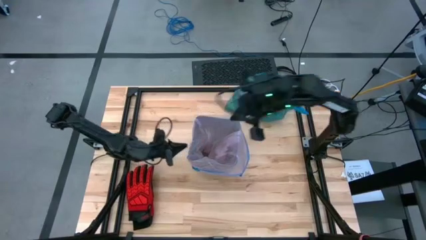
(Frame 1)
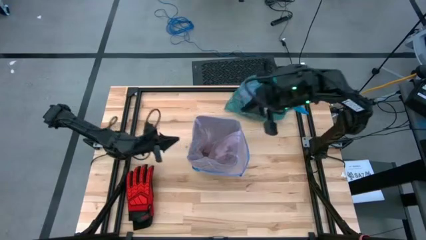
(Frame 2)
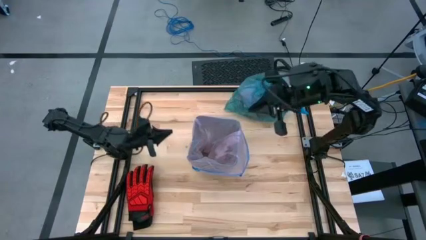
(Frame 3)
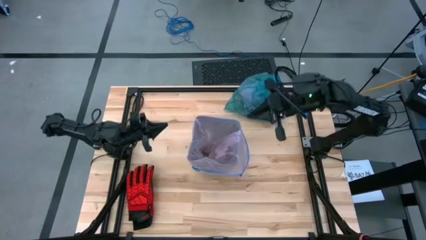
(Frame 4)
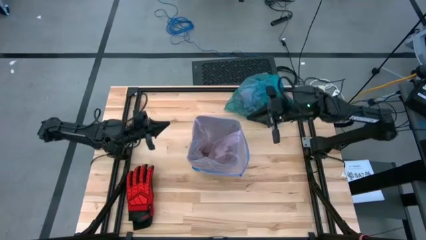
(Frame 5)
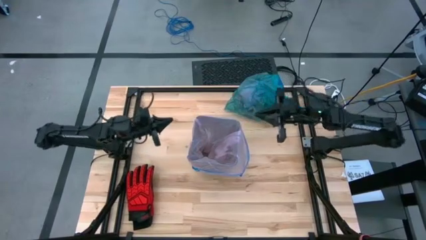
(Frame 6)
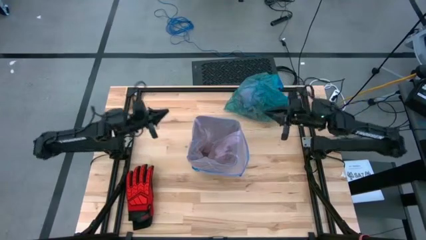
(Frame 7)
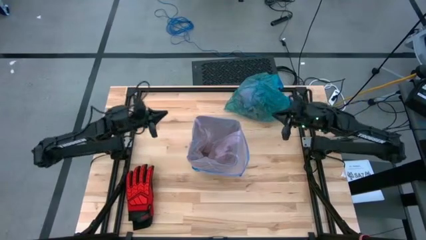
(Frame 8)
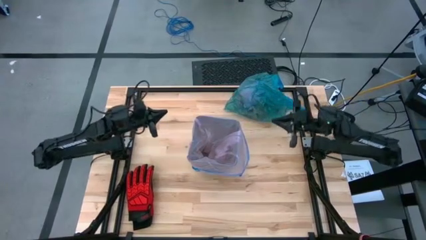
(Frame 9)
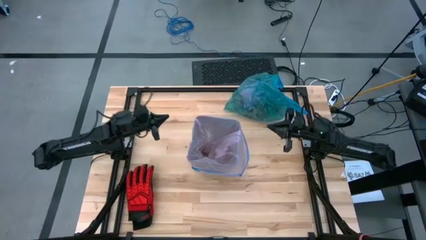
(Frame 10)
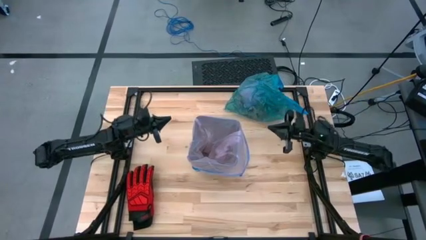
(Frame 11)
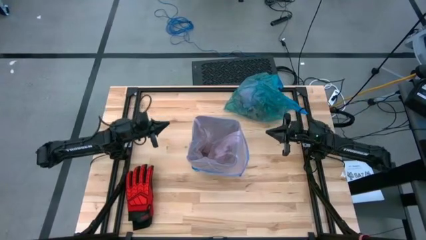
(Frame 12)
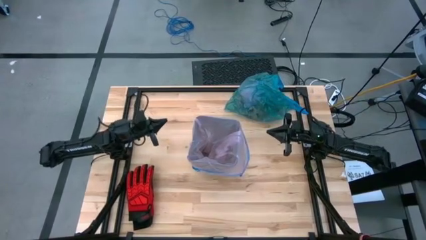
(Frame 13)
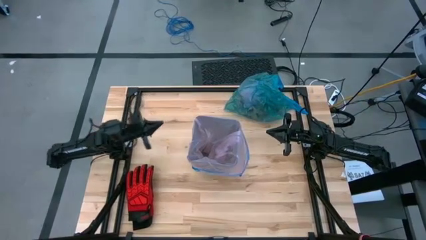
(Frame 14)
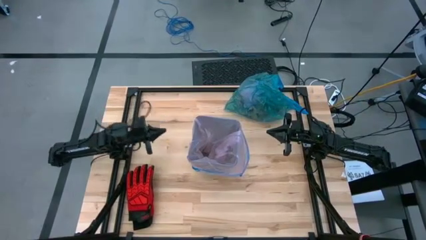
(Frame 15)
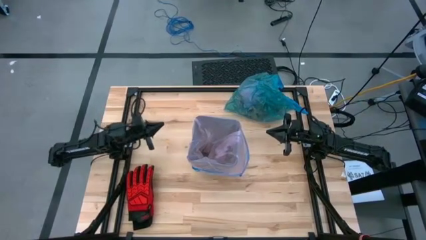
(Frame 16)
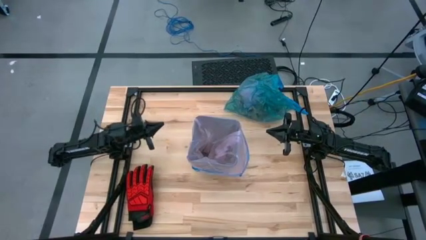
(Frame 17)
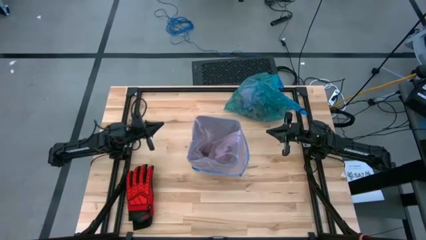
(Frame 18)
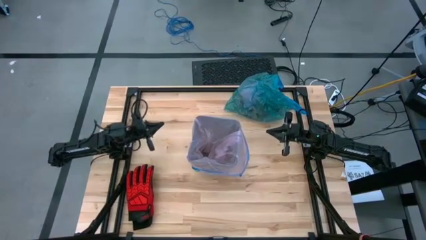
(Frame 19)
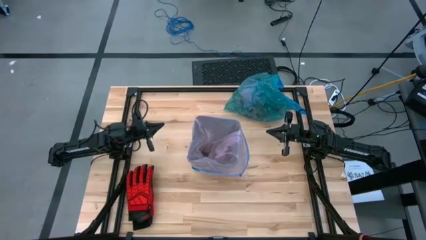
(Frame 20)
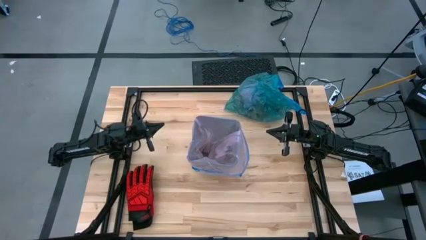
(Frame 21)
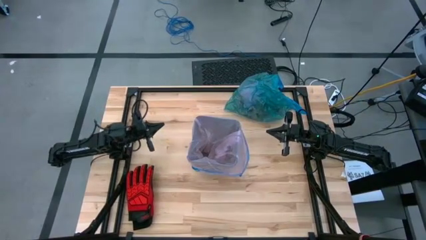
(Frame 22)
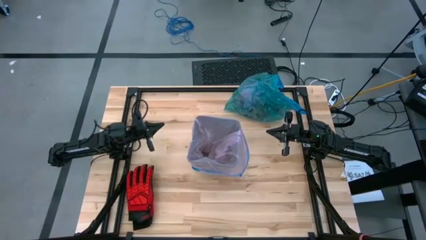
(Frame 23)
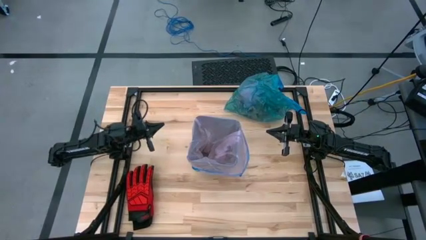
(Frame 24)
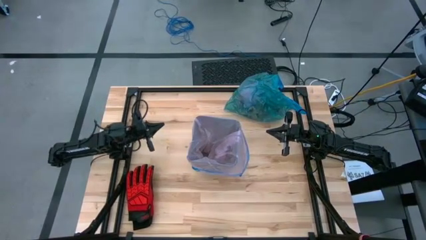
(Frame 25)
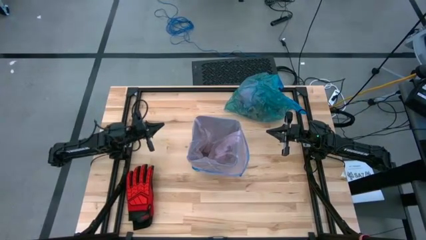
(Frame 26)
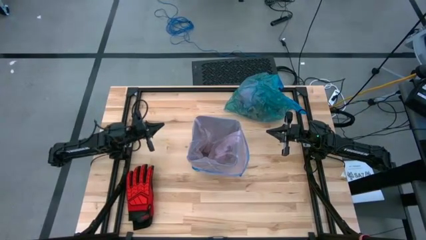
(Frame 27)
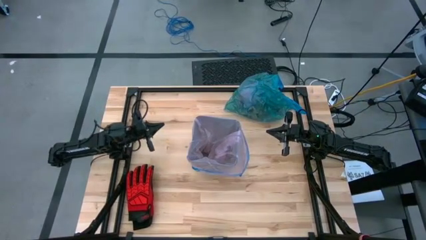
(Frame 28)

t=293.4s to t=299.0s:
Task: place trash/remove bag and relplace
Return to Home Position

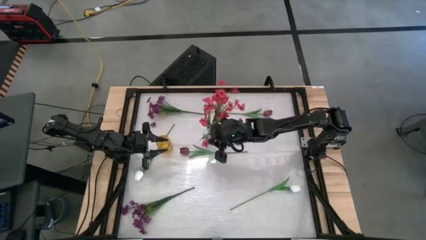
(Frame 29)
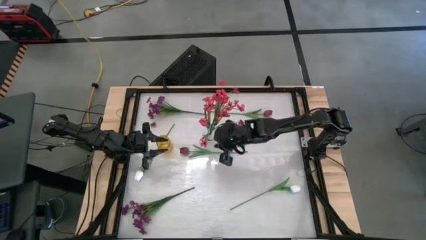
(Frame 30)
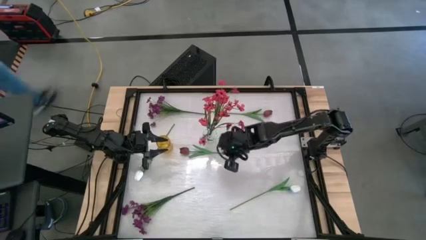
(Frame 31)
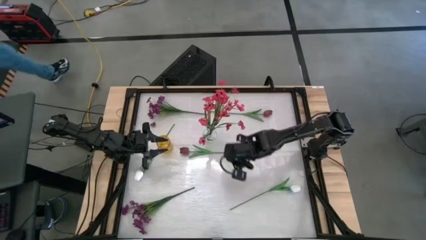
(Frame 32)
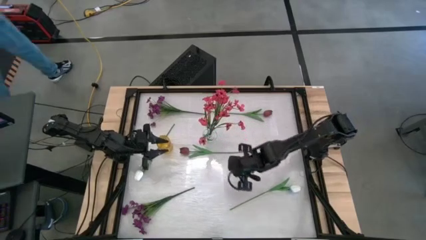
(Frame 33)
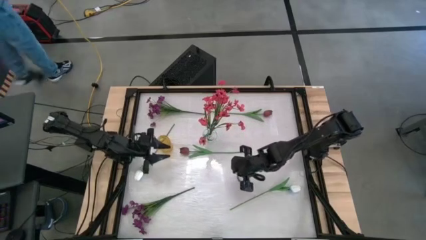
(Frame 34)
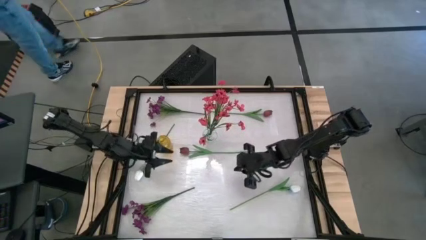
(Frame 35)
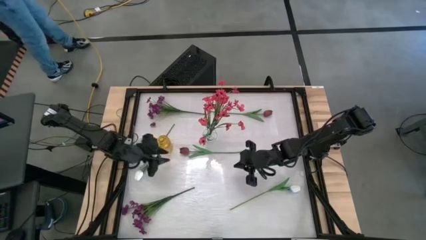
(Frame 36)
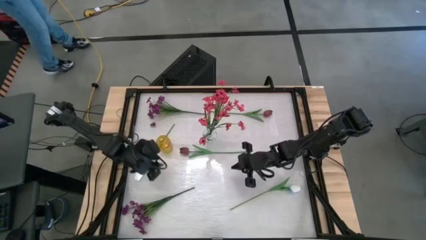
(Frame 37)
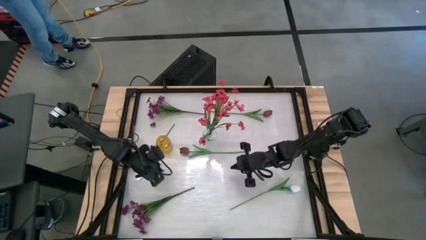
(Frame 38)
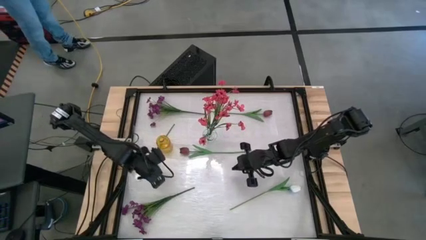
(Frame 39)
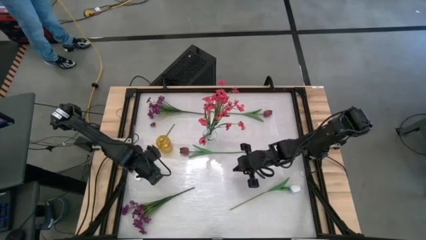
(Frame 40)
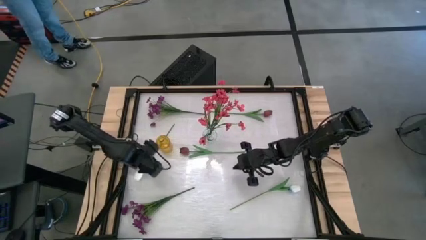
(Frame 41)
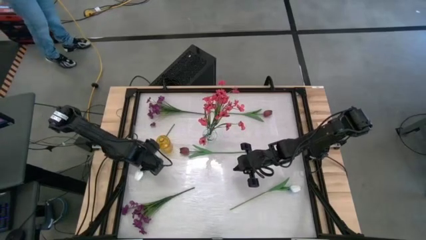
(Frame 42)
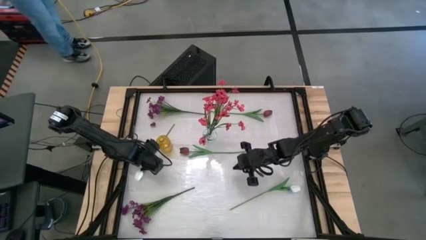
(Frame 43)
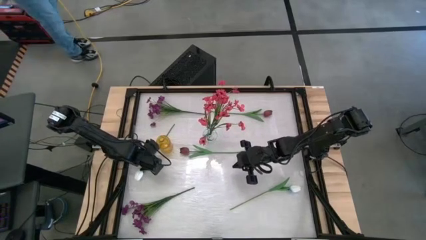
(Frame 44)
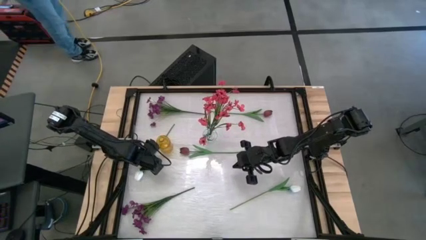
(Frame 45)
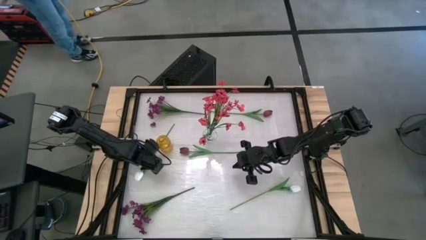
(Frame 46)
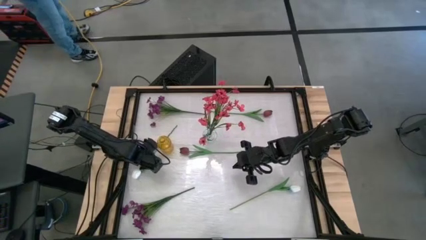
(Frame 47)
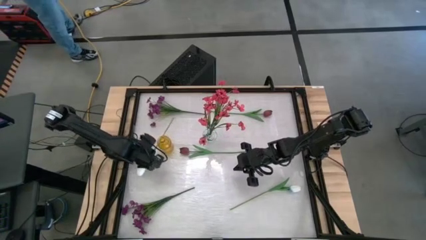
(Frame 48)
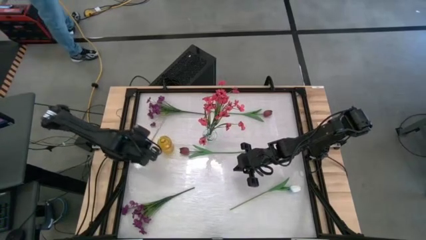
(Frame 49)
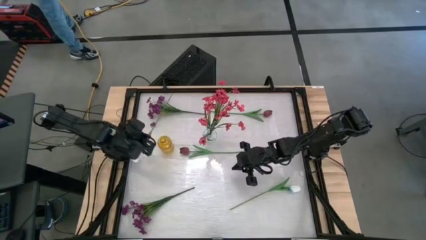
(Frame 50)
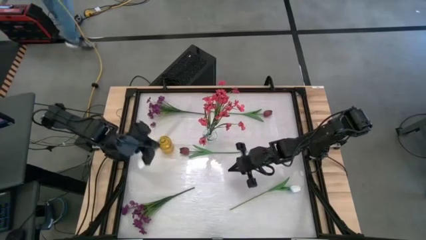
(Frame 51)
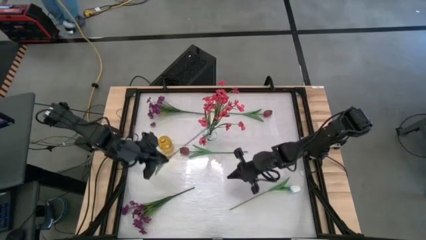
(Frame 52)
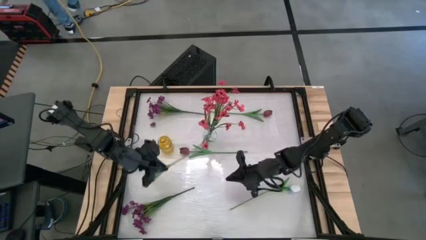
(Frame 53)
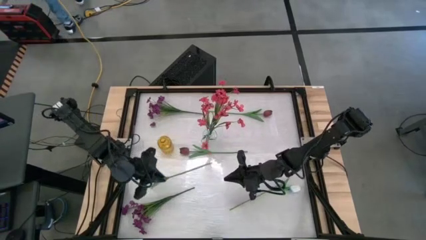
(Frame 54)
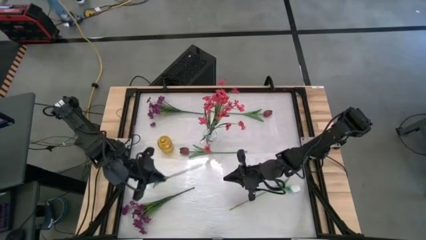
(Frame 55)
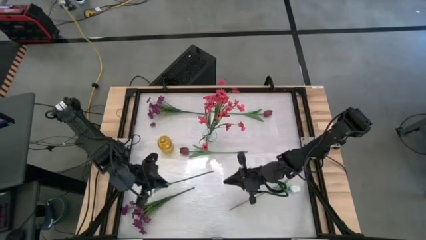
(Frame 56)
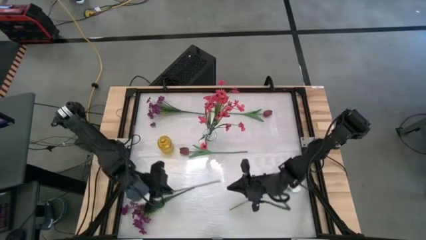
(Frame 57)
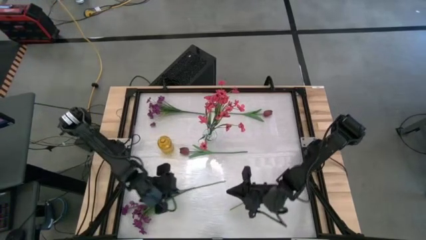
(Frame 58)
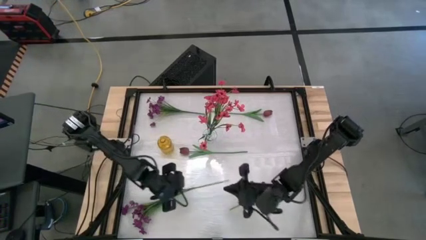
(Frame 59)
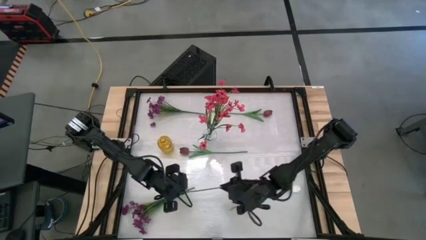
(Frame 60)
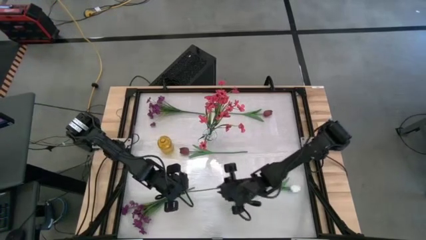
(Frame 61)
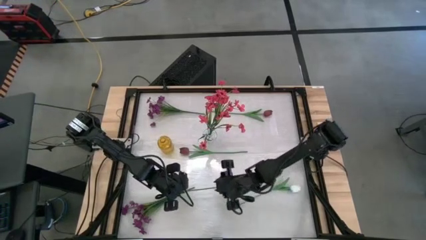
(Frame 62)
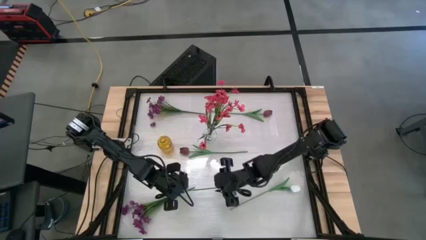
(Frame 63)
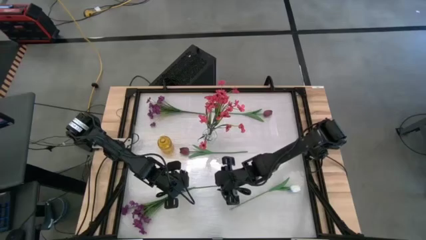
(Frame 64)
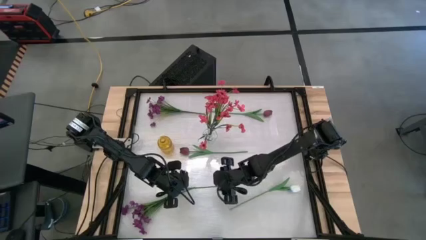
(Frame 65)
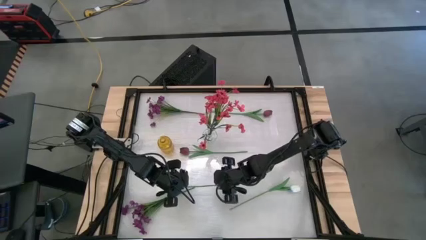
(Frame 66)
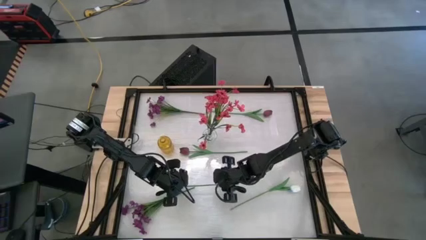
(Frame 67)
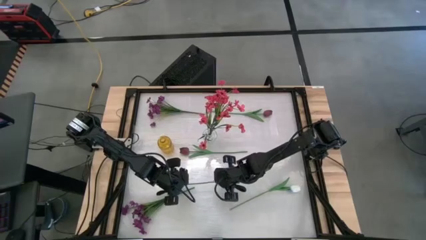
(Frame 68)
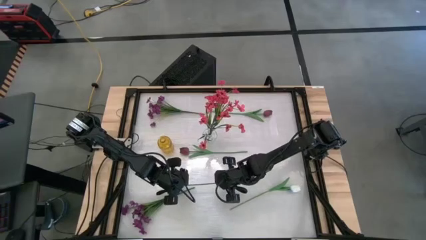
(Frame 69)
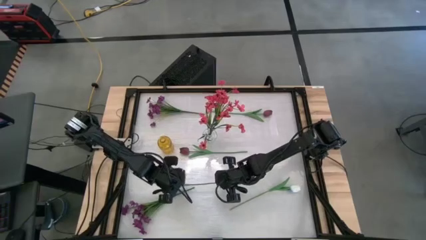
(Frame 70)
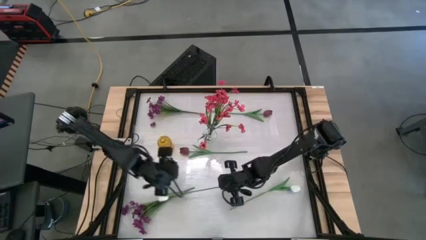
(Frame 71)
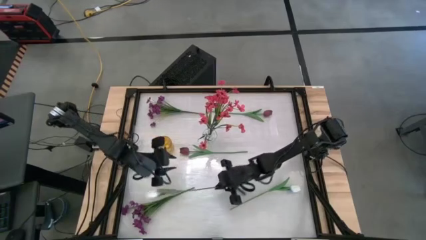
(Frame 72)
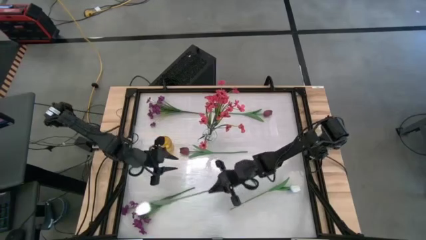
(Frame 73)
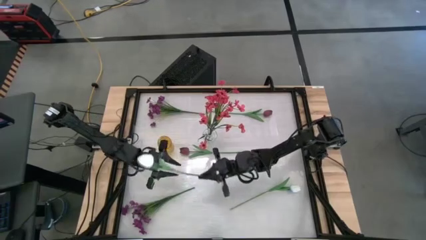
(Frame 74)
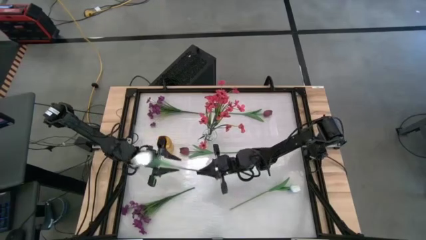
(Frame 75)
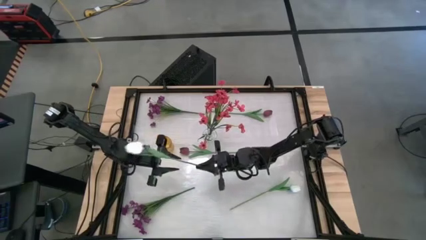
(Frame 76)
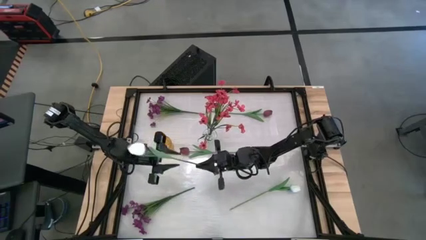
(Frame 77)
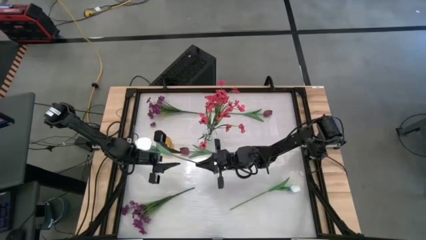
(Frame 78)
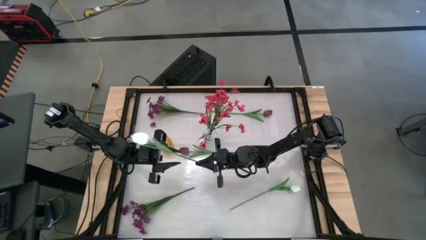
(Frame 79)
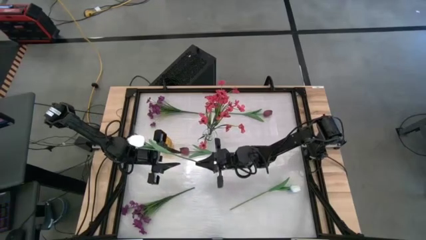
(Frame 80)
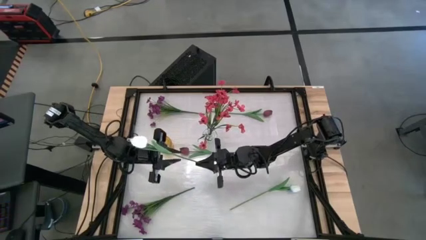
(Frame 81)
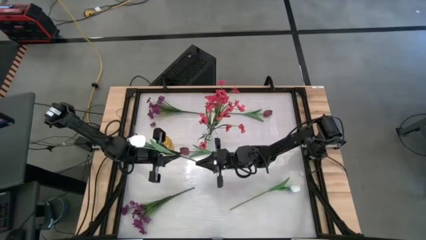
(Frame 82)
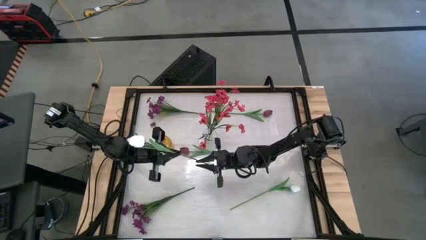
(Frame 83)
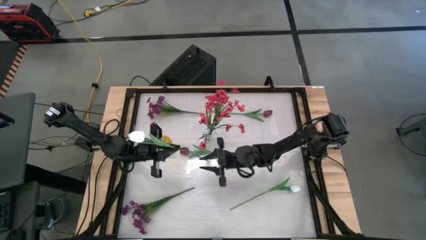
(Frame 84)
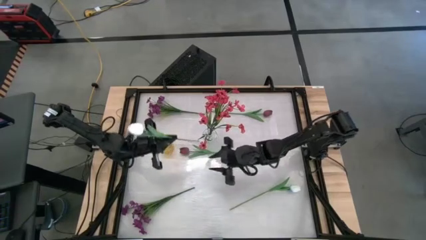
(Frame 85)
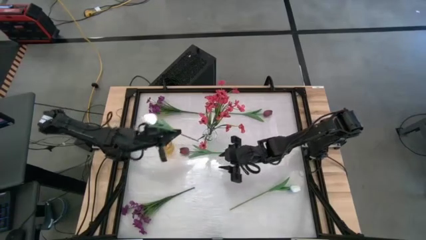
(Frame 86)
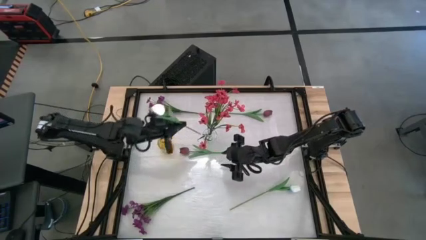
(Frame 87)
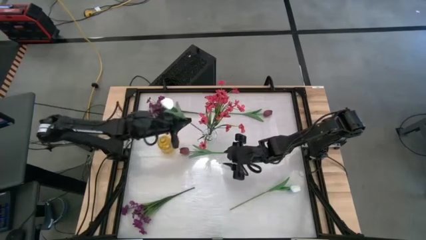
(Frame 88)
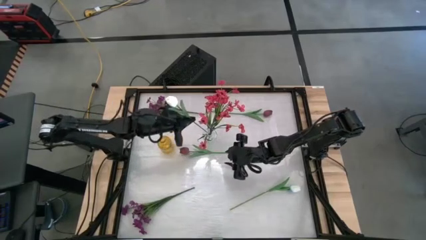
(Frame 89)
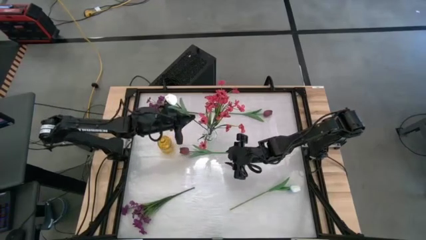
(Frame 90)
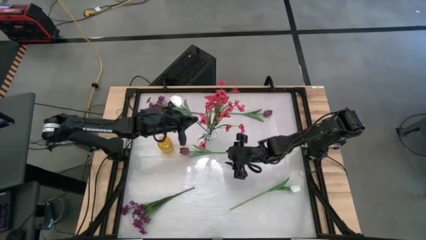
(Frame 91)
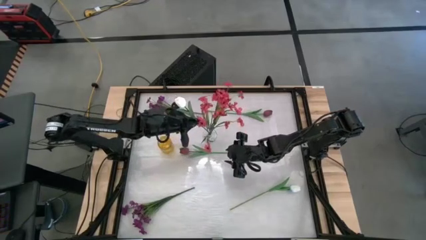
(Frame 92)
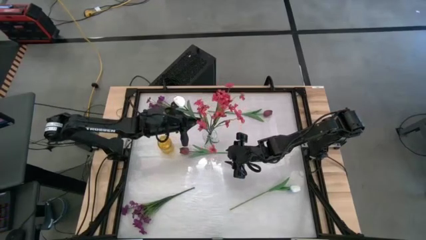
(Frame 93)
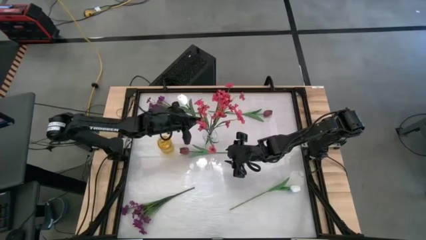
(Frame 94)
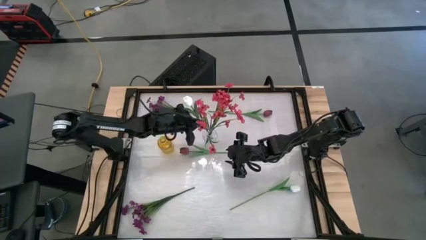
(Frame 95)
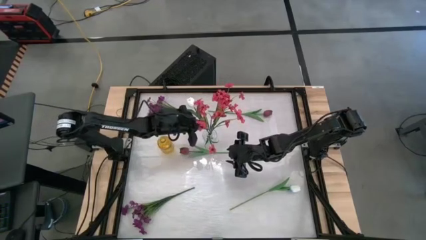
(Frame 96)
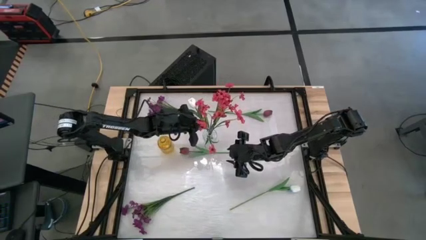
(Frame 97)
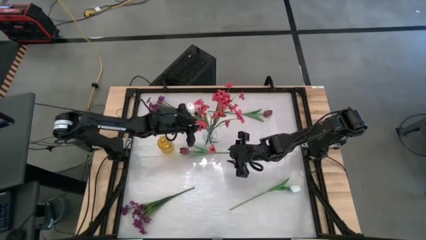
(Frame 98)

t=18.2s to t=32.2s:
Task: Sort flowers into vase by color
Put the left white tulip into the transparent vase
